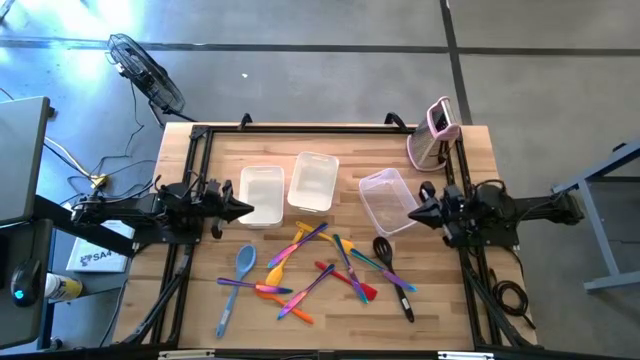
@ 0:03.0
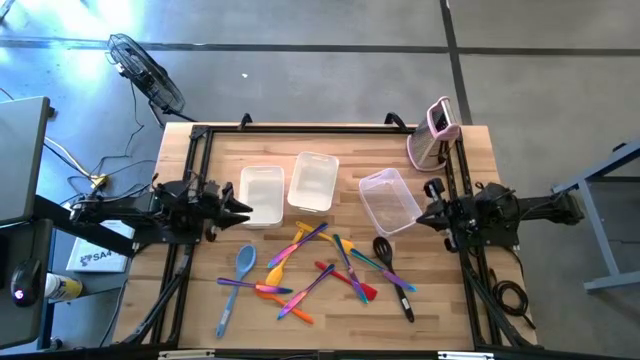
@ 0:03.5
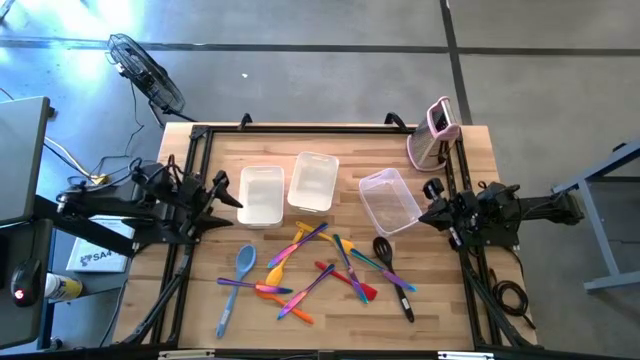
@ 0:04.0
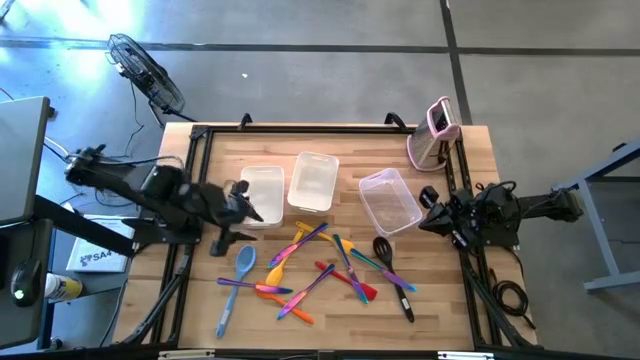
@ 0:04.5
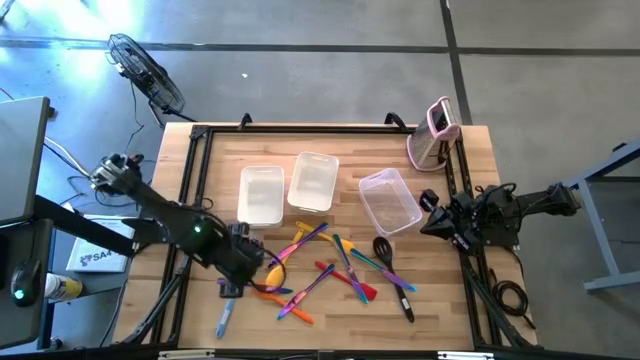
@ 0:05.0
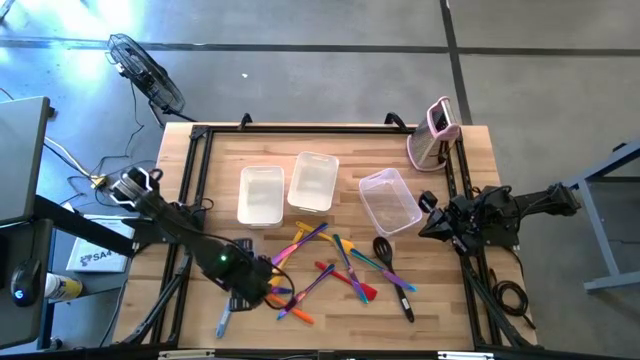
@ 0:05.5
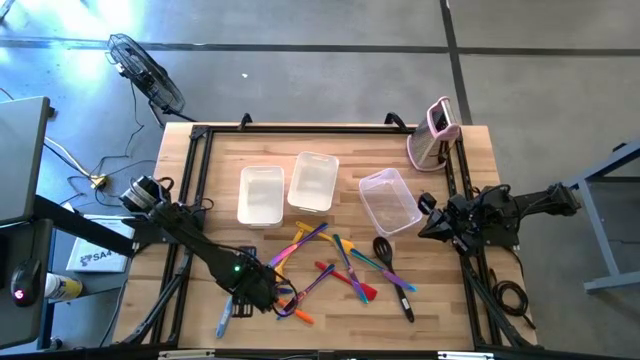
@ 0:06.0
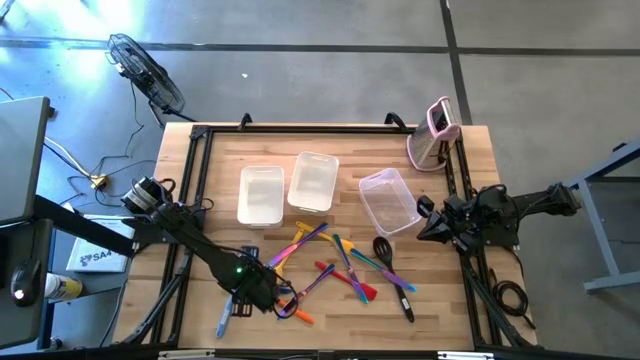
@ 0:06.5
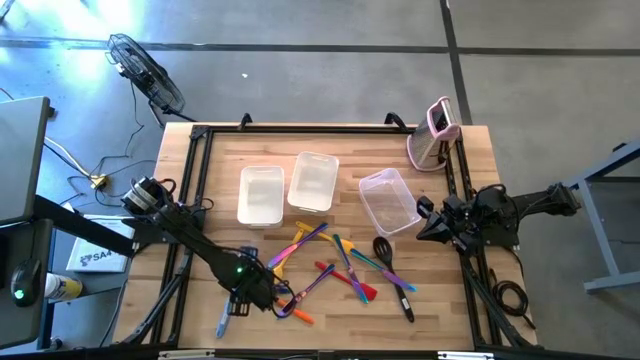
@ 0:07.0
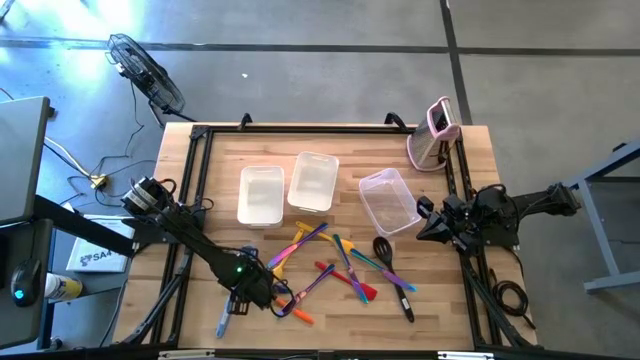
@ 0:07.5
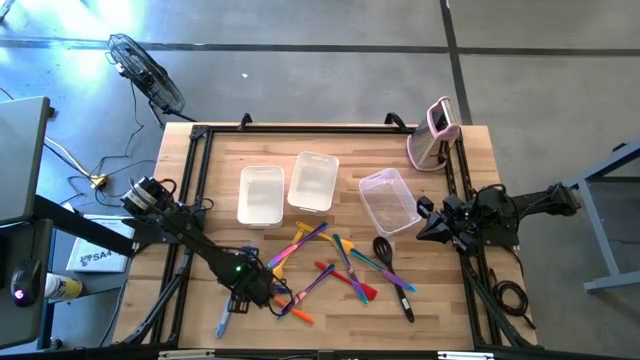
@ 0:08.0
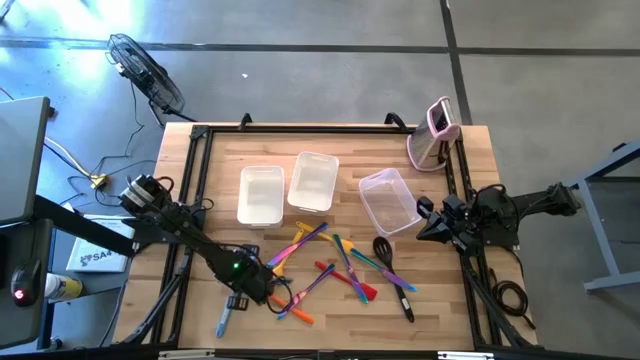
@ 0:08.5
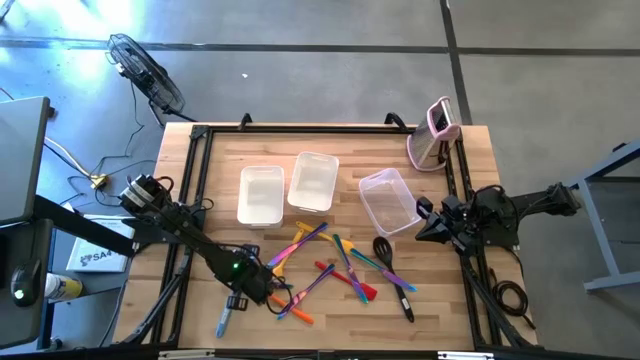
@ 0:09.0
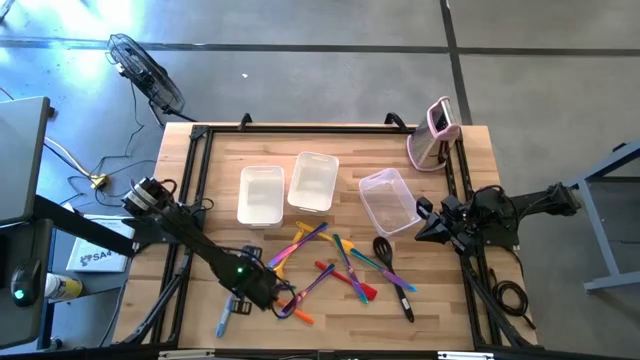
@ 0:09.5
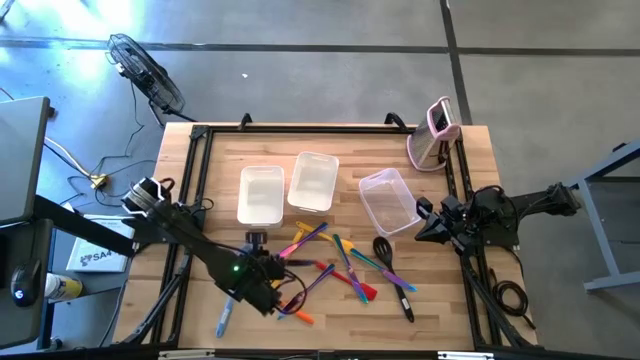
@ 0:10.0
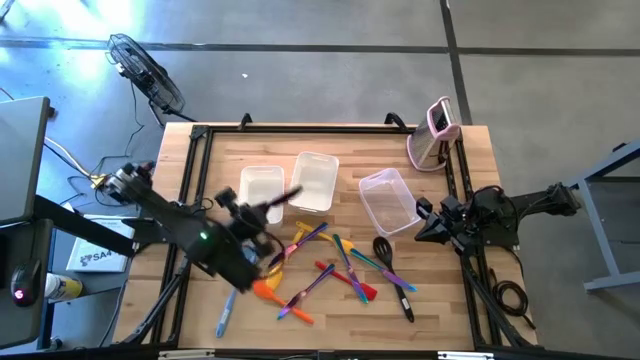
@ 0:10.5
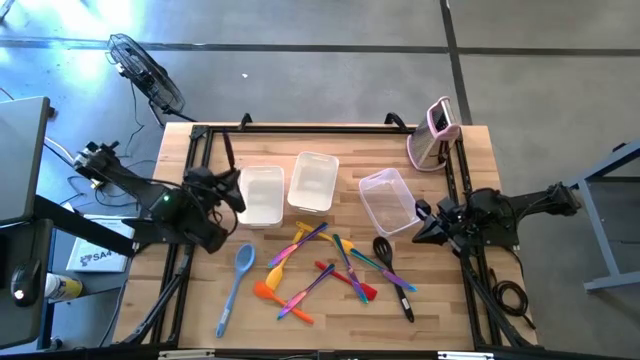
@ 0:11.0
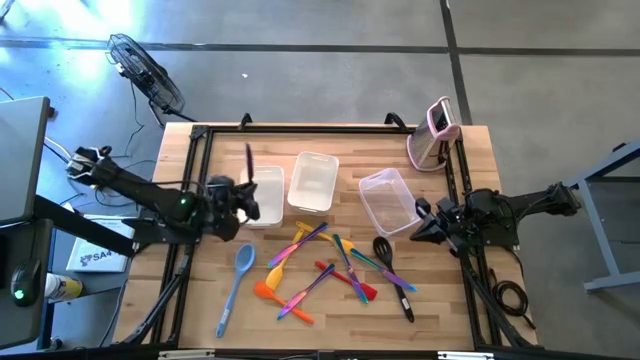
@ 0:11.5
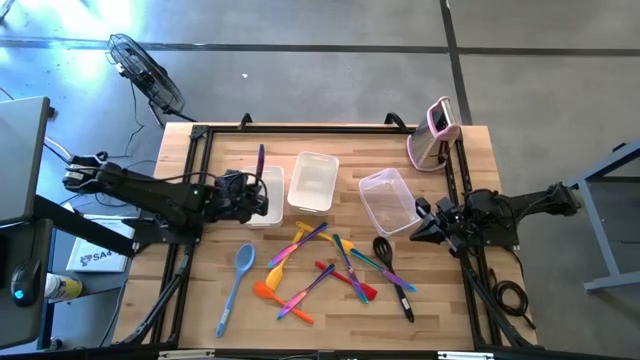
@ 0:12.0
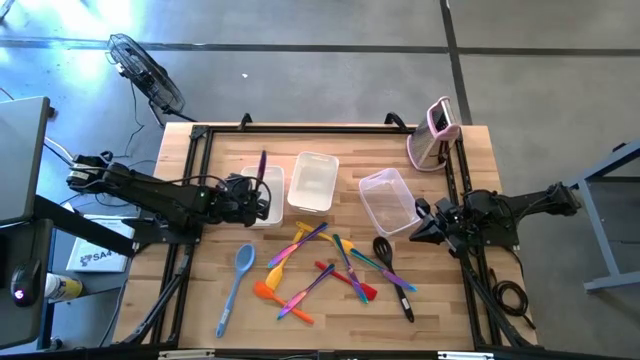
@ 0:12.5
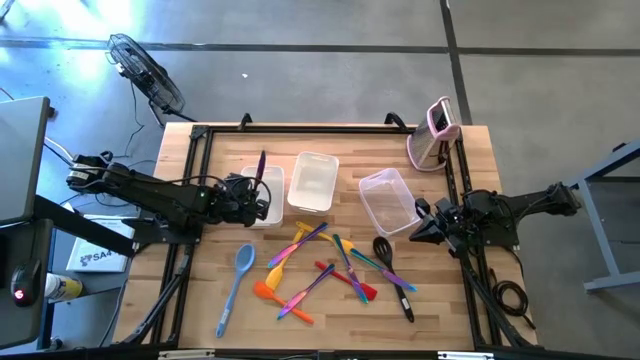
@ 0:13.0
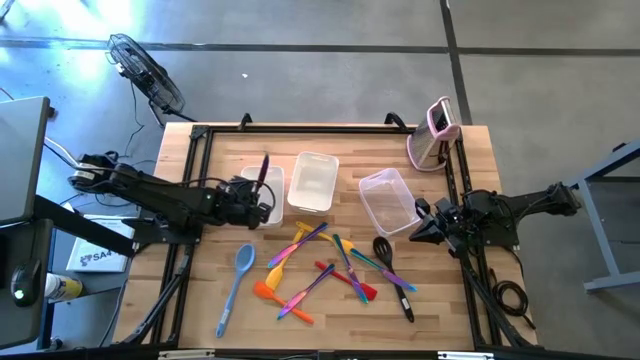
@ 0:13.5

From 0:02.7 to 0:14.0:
Task: Pick & Place Kitchen Items
Put the blue table knife into the left white bin

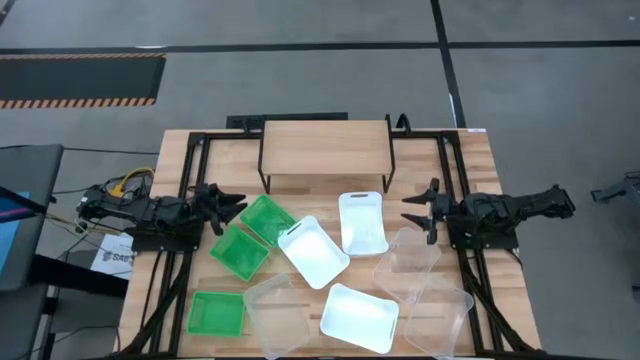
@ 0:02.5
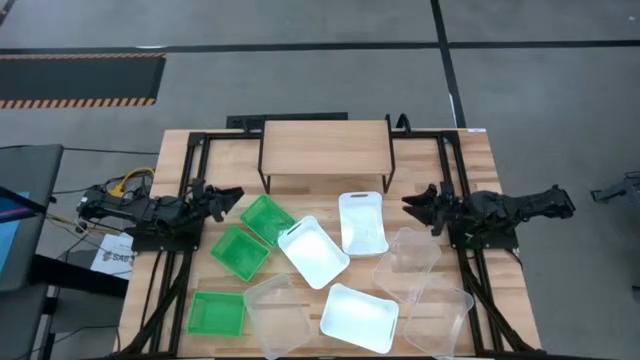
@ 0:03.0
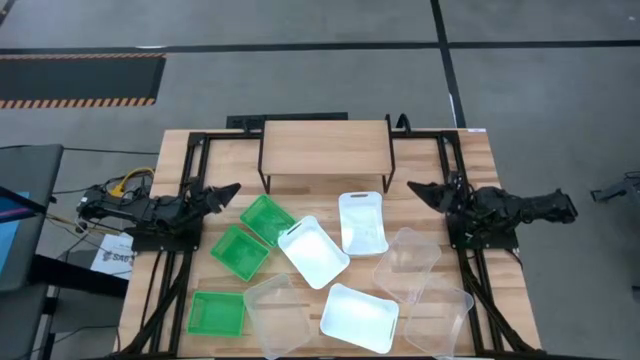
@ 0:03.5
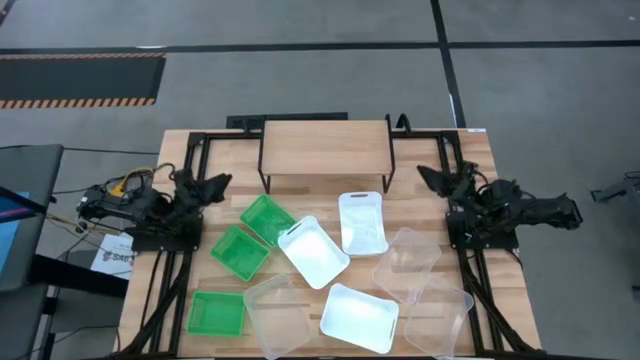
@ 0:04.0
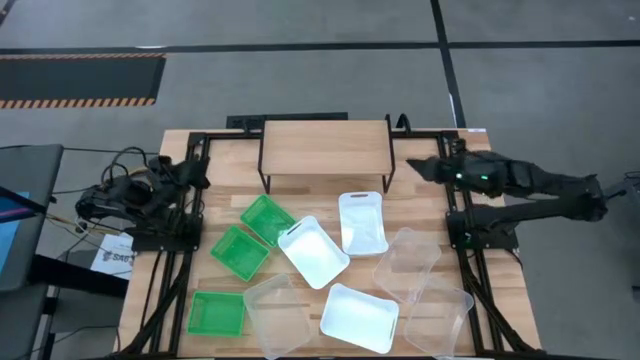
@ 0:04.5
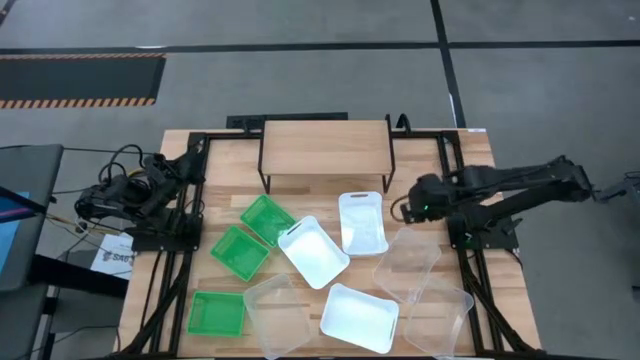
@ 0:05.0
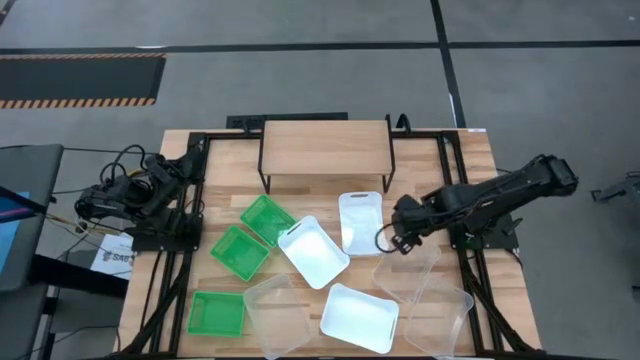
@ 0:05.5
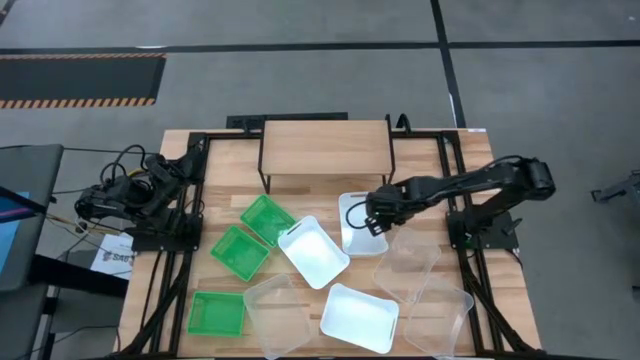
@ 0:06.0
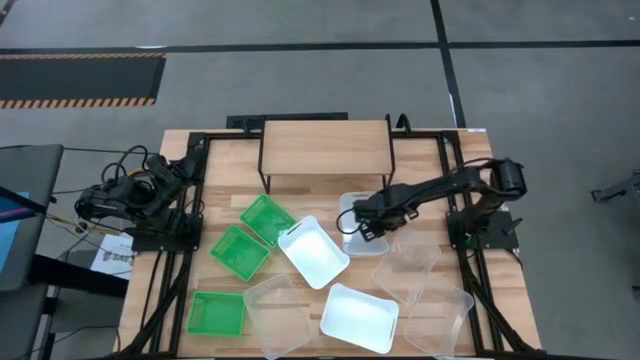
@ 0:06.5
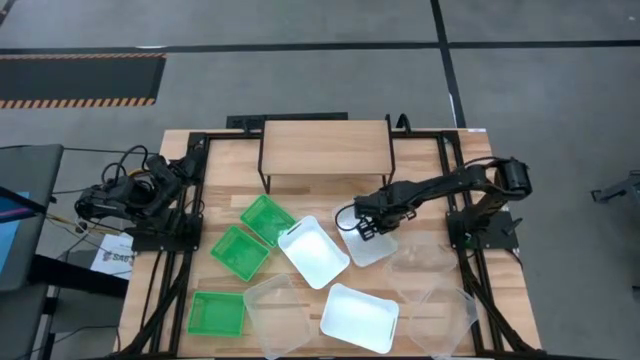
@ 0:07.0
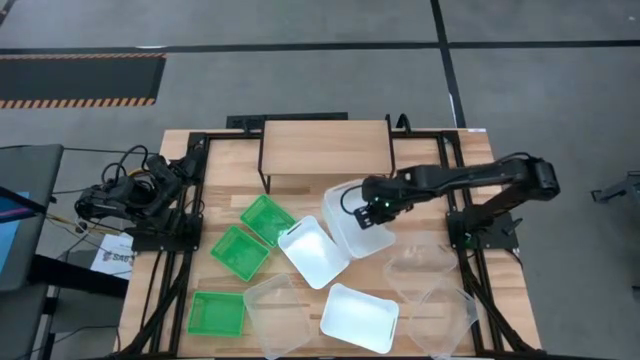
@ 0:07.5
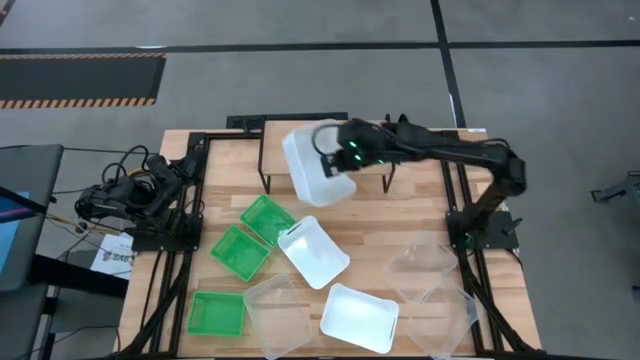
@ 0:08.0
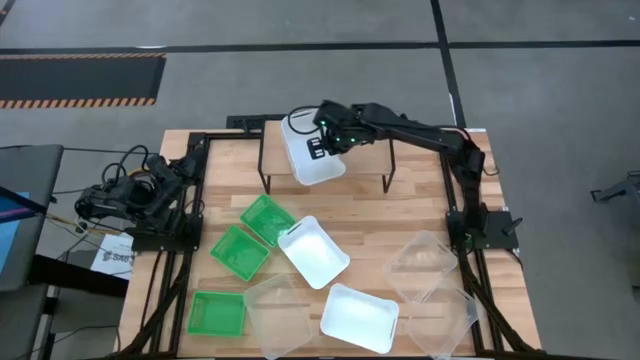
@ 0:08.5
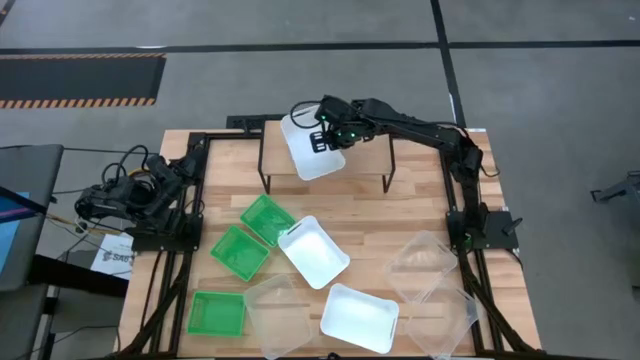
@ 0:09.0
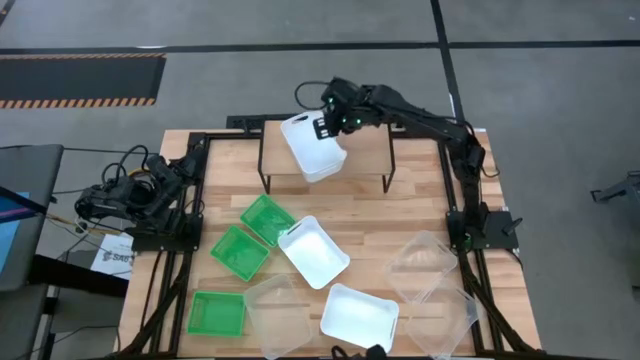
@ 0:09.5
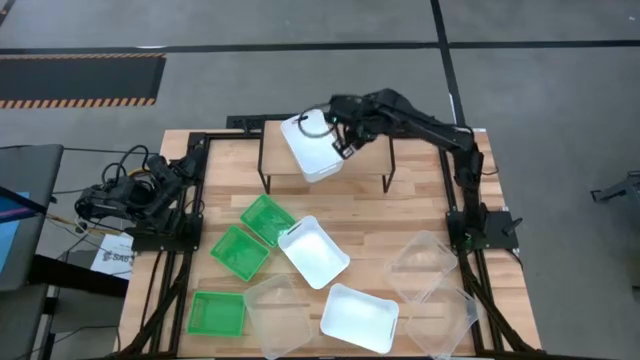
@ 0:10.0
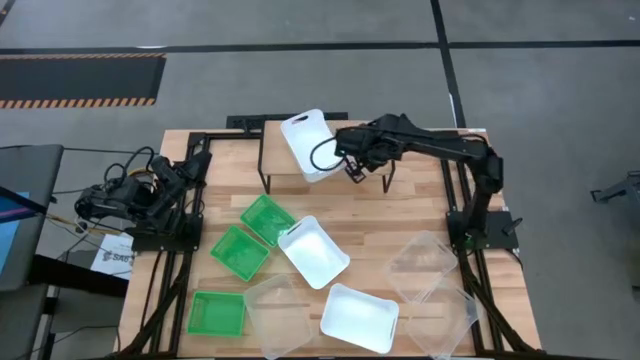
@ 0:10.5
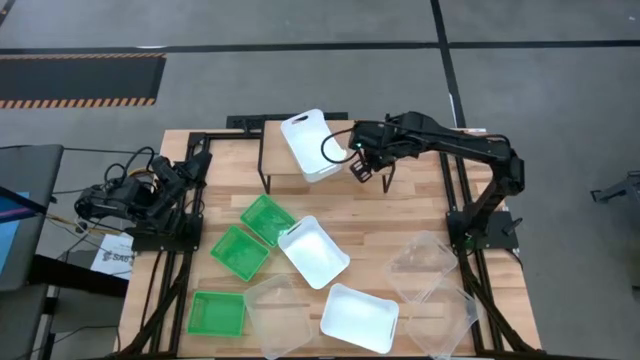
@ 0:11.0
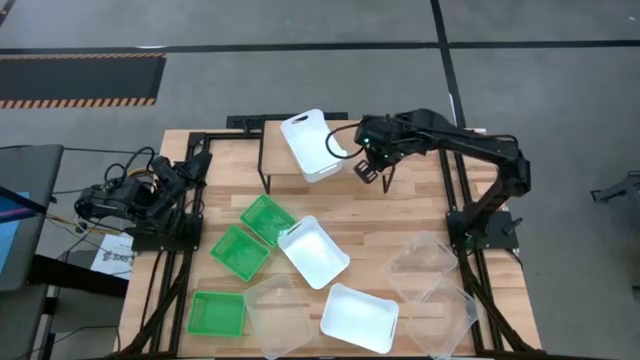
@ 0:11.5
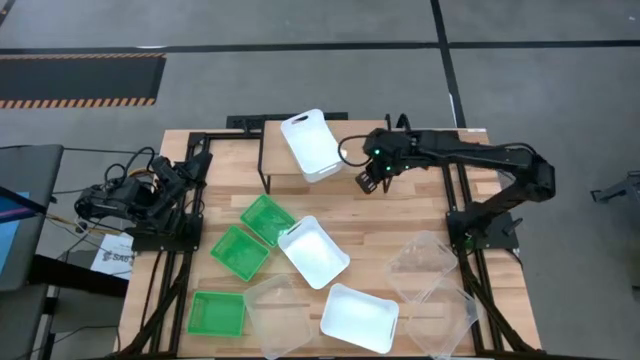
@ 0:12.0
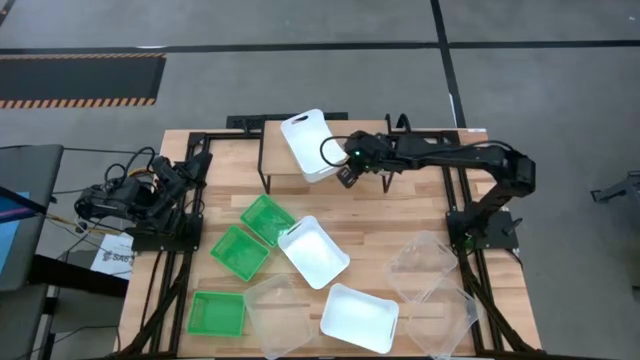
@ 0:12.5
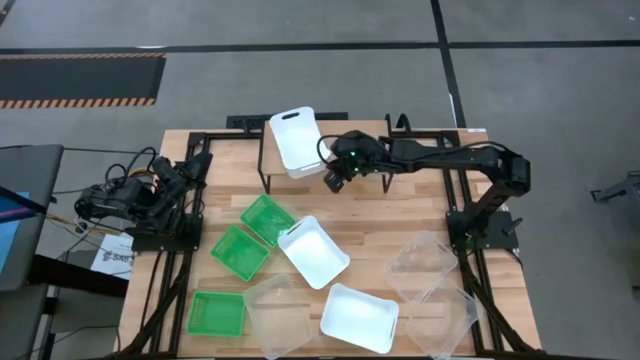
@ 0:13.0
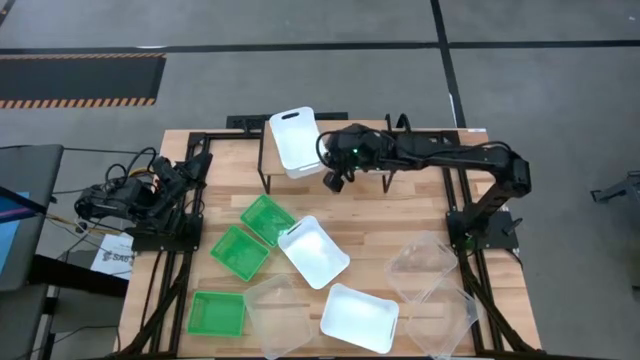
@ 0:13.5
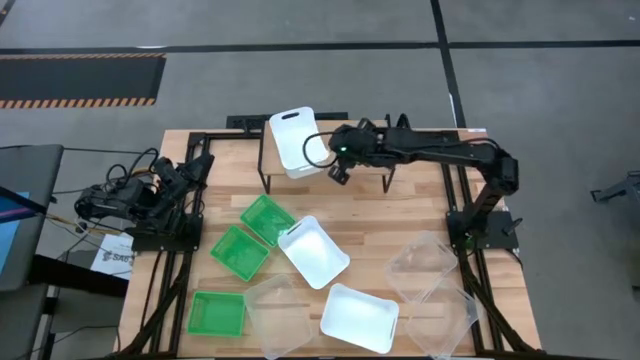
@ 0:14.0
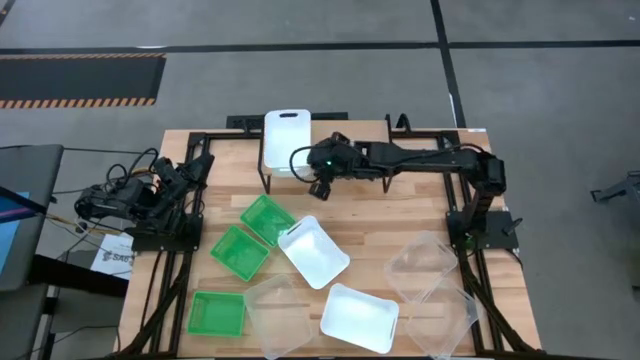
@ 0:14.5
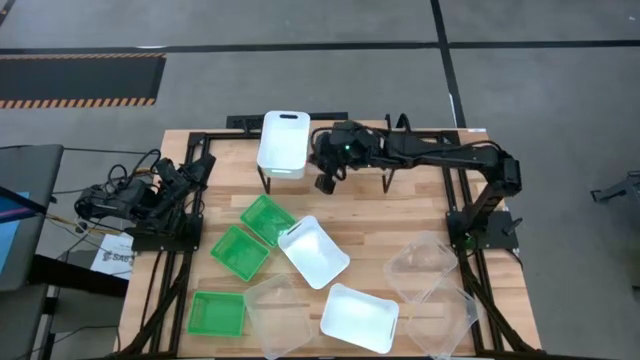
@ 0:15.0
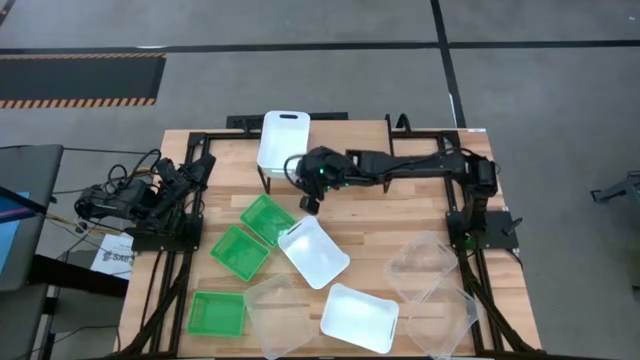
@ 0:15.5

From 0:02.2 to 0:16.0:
Task: Stack baskets on shelf by color
Put the top right white bin on the shelf
